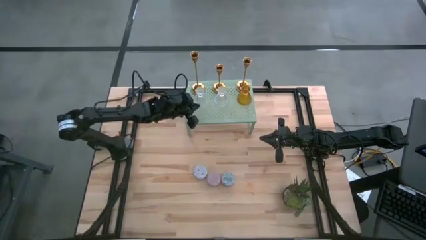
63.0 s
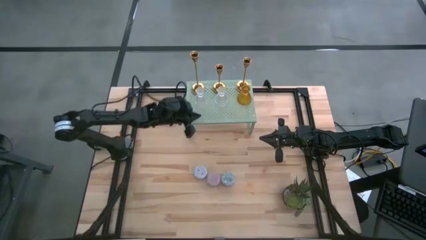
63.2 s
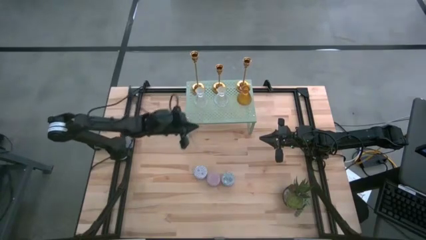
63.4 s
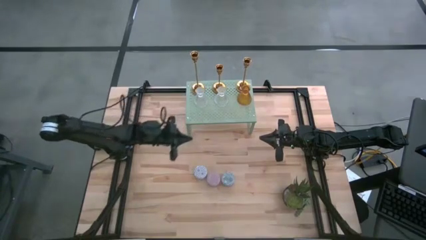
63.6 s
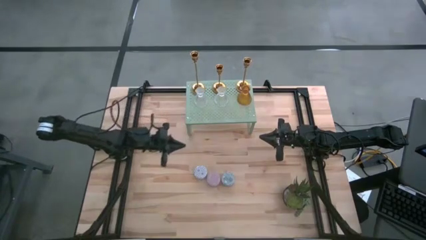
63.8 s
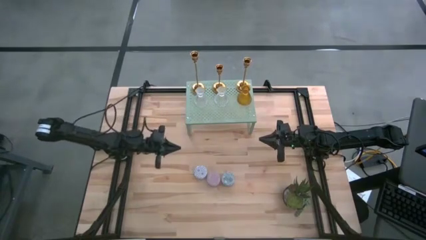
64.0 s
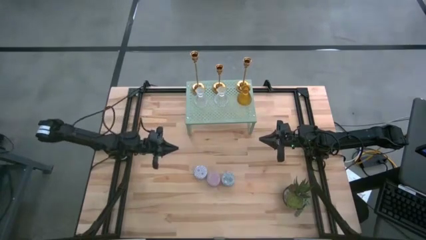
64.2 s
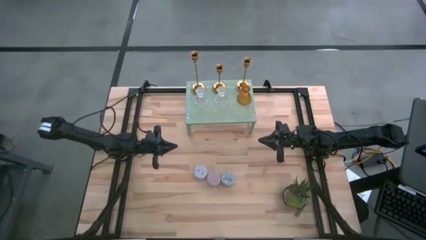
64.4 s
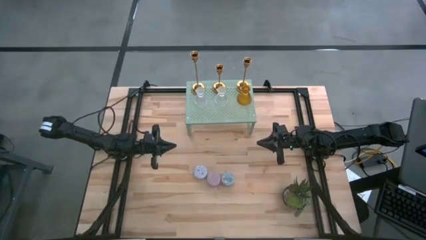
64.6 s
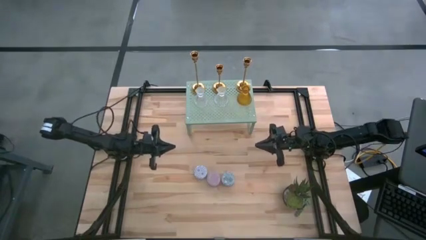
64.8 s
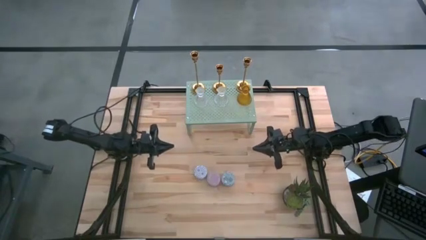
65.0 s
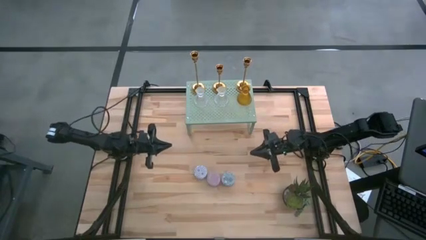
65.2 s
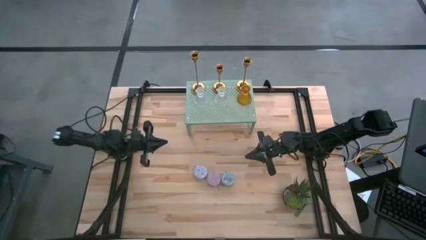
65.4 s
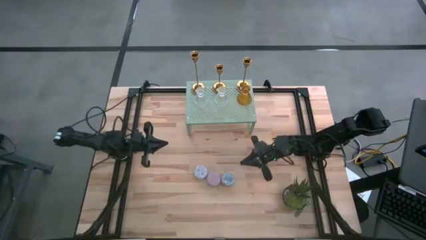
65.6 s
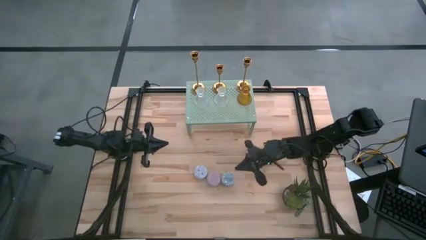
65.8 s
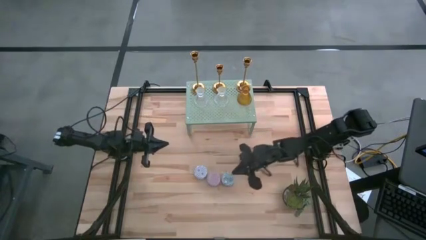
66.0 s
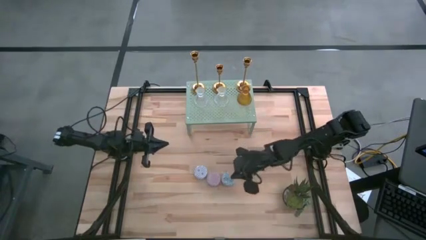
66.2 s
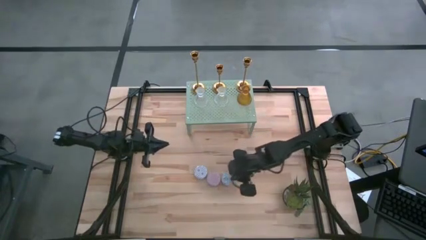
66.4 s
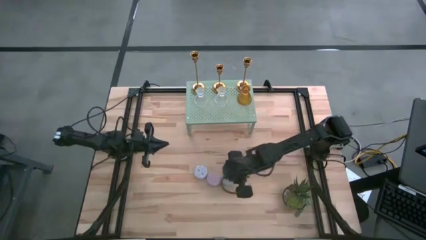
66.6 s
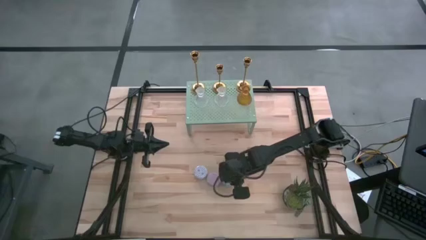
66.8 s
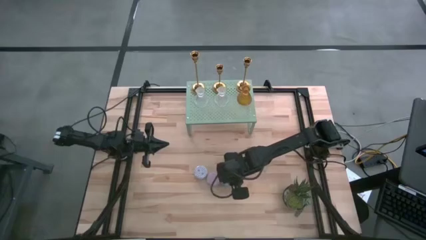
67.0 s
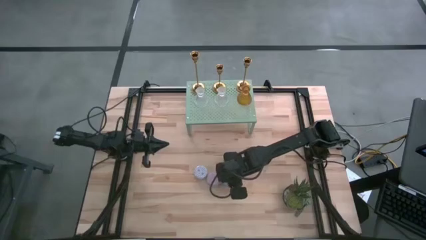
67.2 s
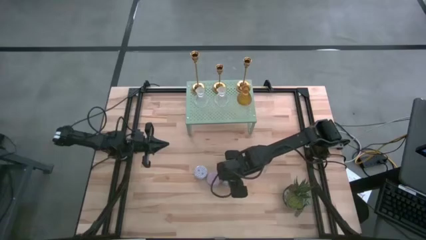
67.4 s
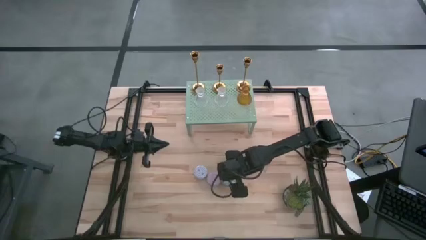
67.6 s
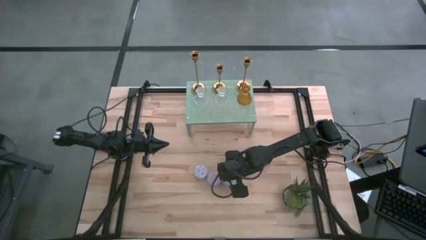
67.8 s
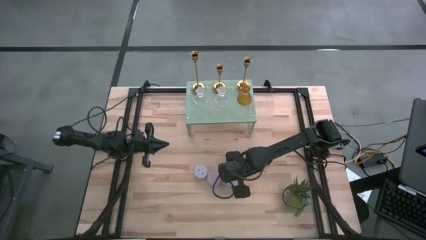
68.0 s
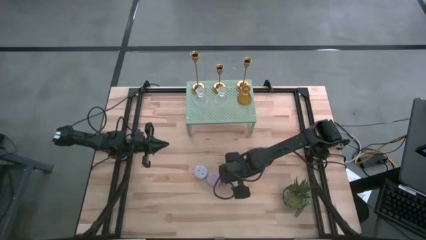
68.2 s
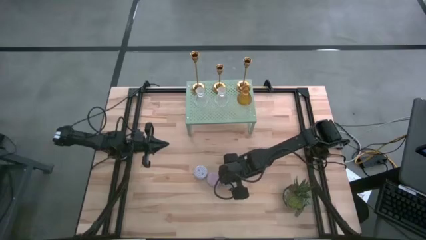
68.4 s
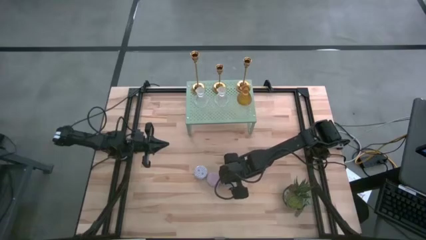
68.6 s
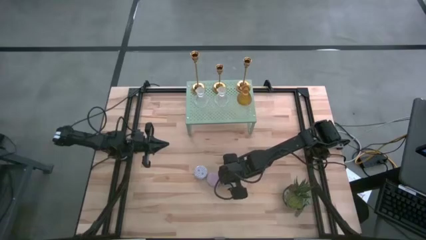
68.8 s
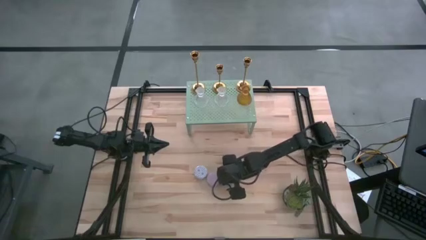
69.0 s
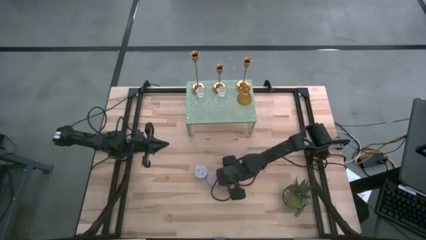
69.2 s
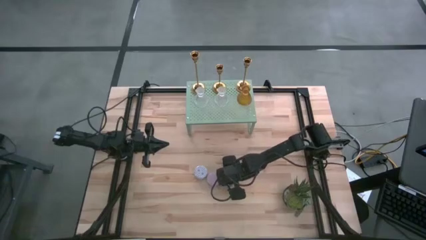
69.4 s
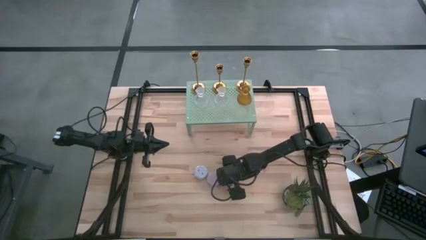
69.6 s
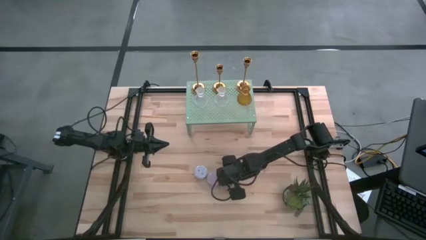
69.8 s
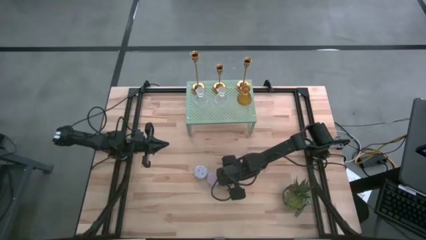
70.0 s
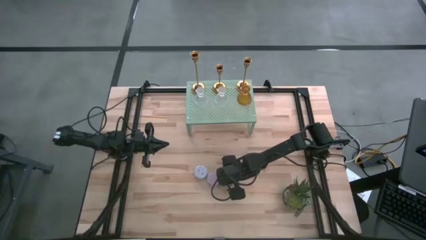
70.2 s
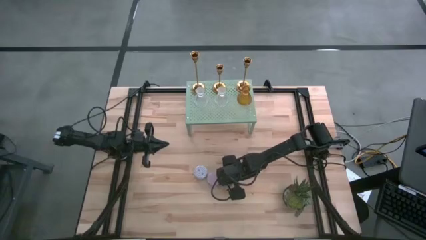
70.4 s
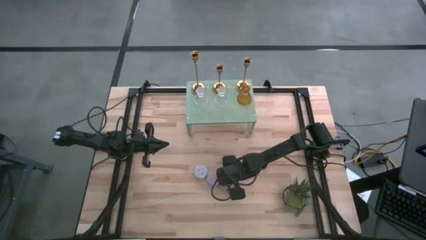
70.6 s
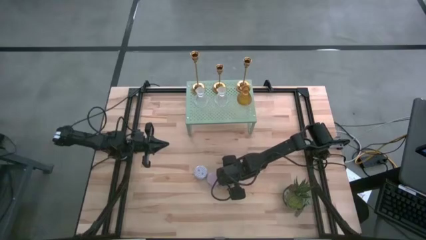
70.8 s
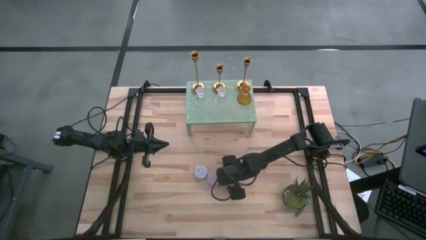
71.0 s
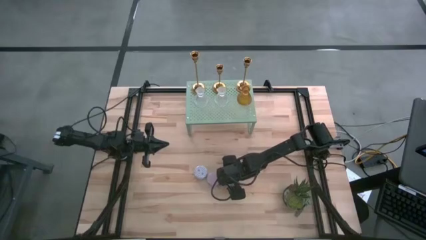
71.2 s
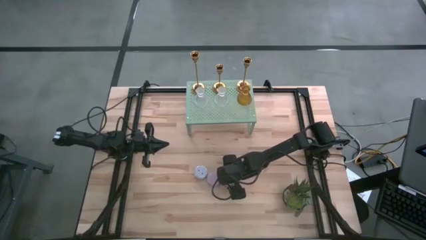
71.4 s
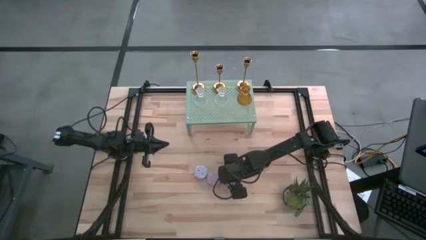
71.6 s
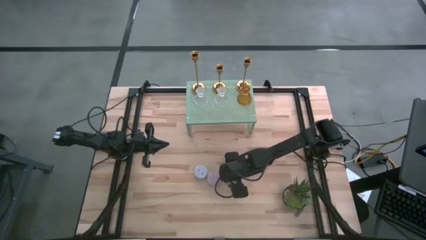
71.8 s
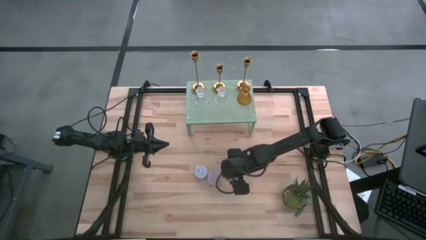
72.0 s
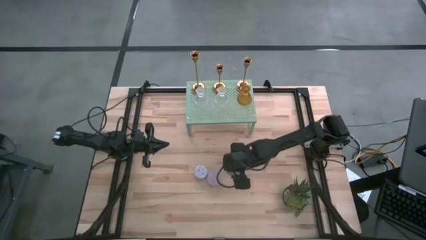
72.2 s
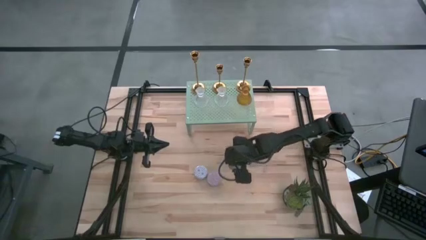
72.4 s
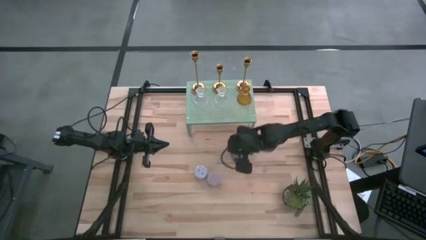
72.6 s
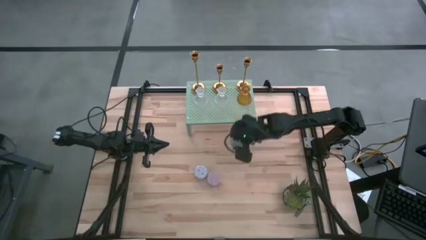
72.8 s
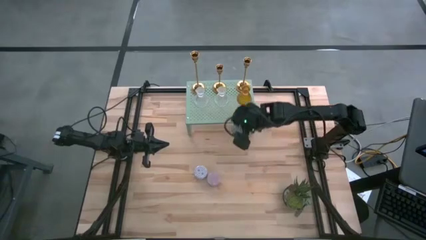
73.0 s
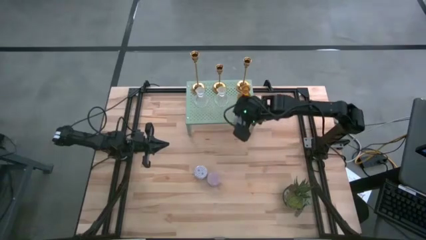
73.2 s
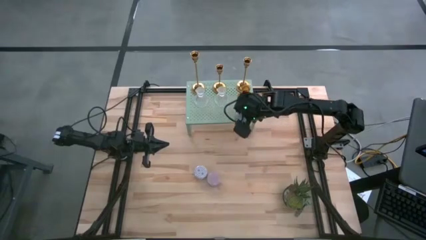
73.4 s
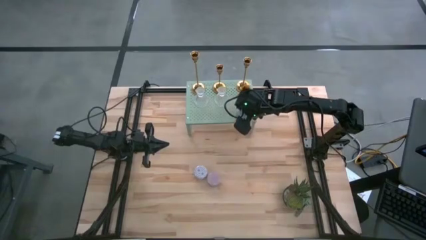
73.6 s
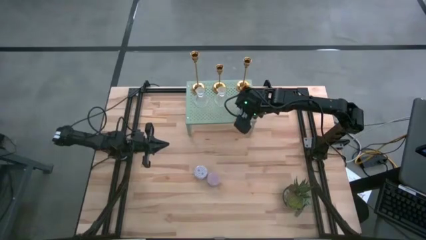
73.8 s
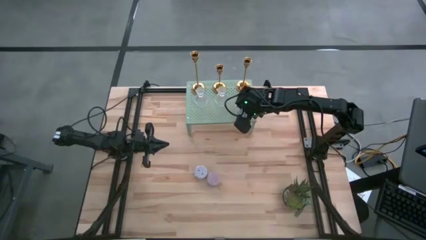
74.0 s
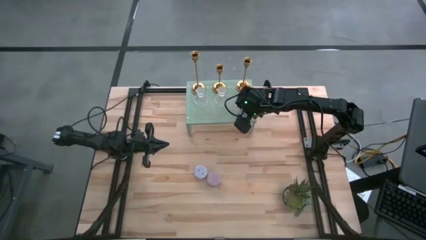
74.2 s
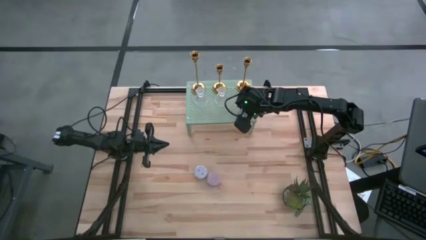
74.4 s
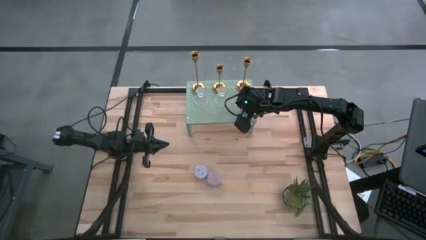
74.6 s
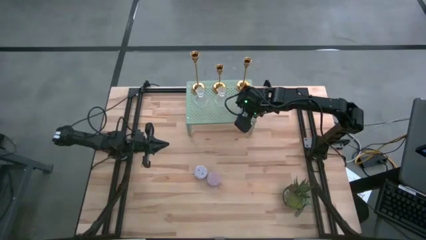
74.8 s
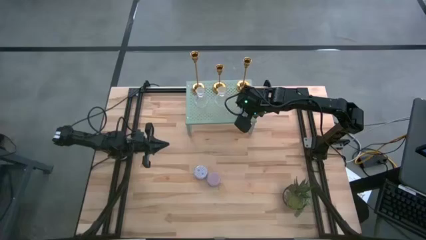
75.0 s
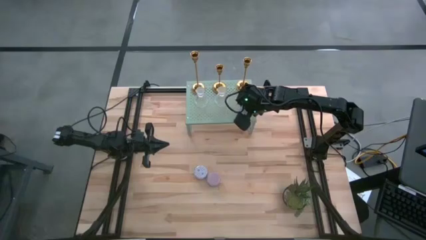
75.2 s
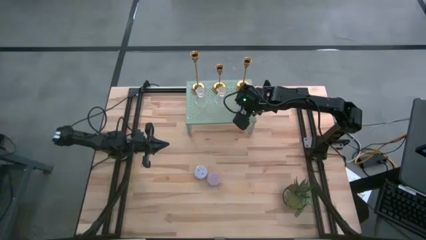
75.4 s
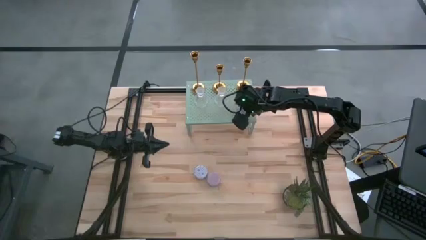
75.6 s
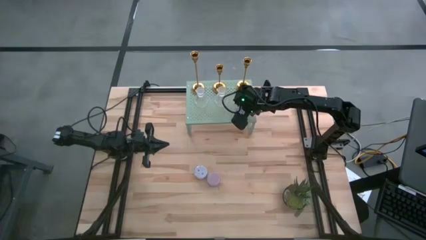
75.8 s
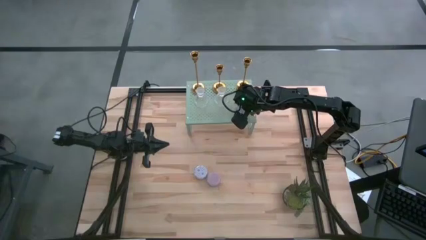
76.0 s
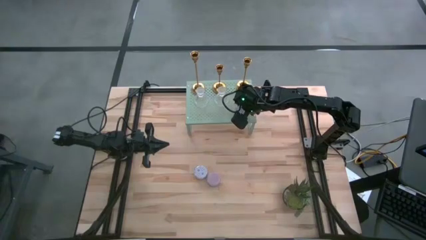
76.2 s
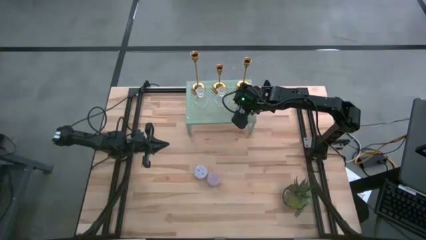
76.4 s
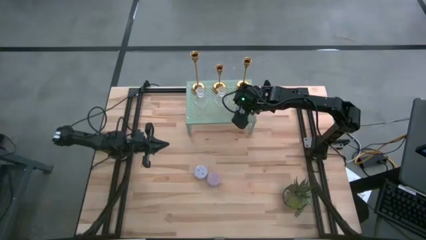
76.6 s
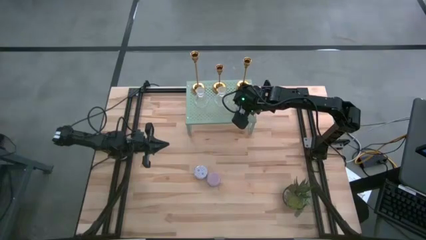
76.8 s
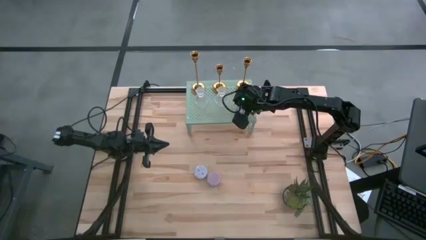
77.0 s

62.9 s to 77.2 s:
Task: Pick & Place candle stick holders
Put the blue patterned scented candle on the shelf
